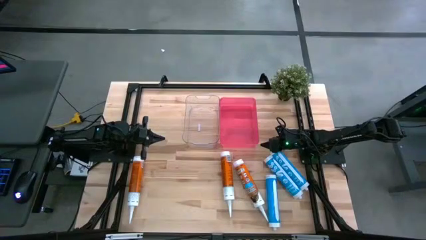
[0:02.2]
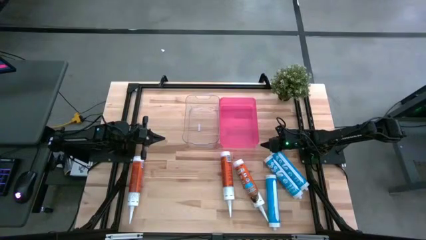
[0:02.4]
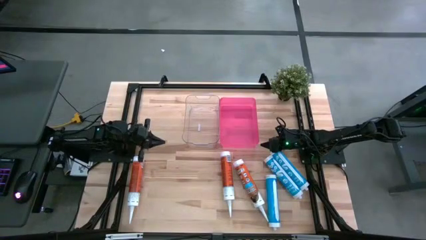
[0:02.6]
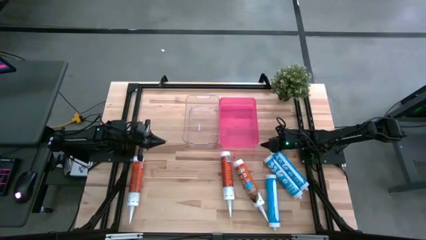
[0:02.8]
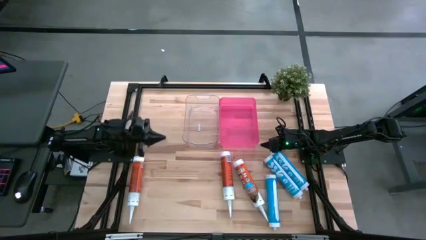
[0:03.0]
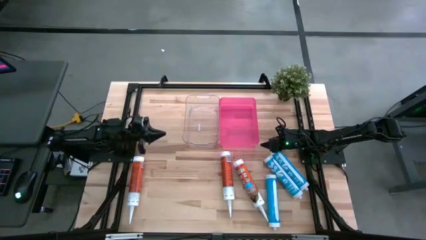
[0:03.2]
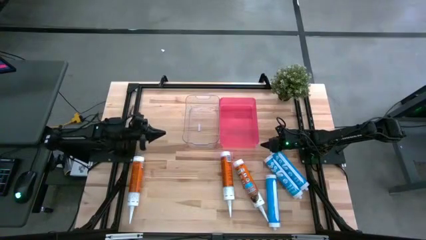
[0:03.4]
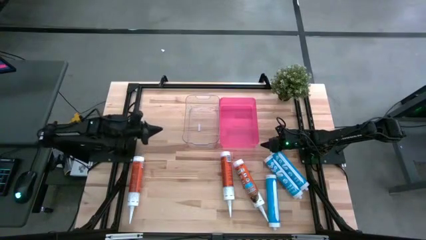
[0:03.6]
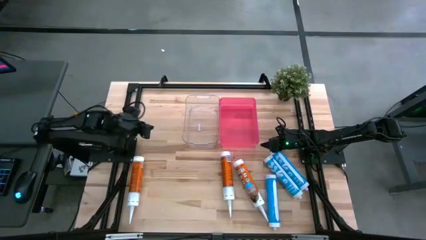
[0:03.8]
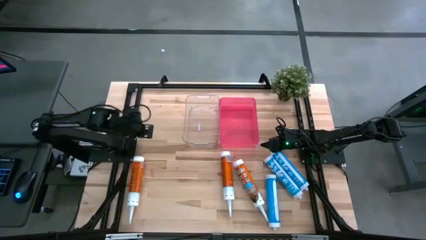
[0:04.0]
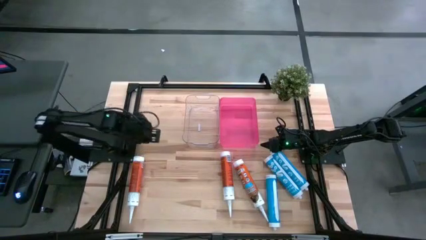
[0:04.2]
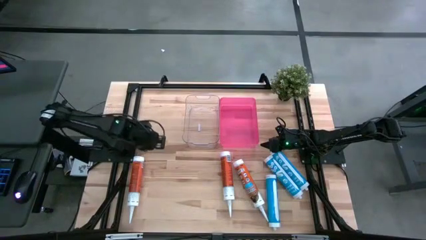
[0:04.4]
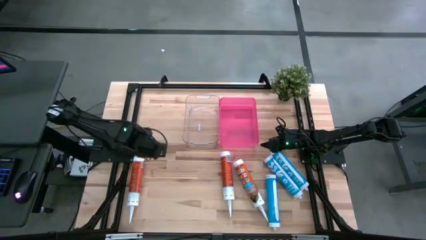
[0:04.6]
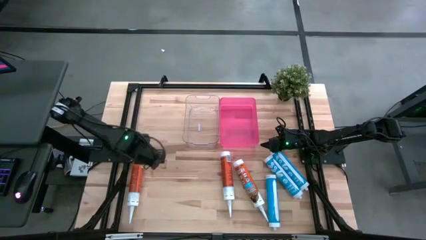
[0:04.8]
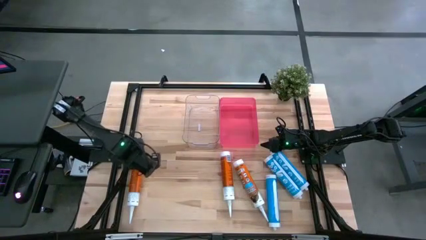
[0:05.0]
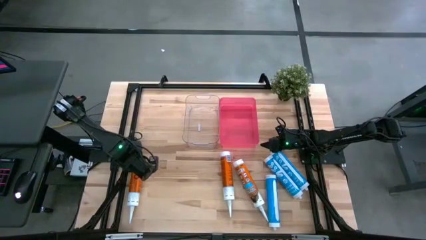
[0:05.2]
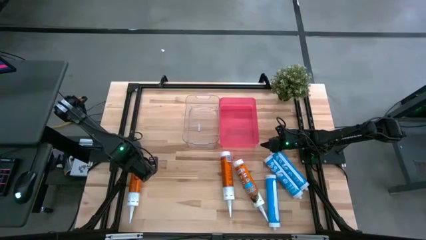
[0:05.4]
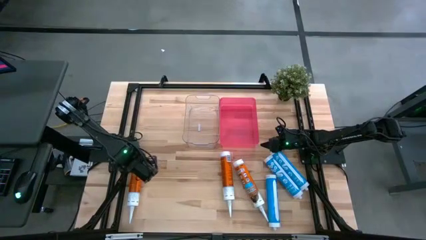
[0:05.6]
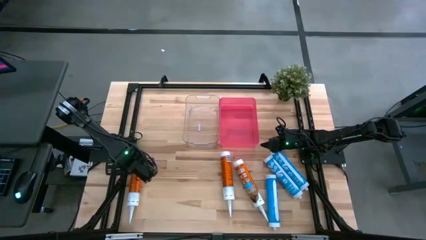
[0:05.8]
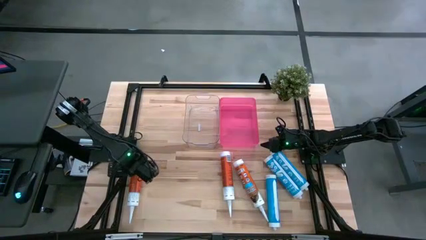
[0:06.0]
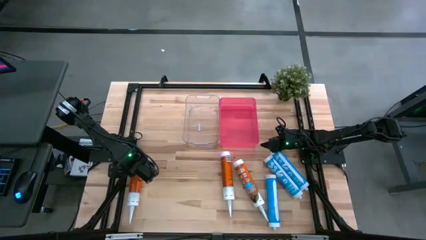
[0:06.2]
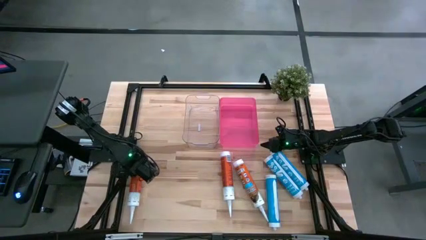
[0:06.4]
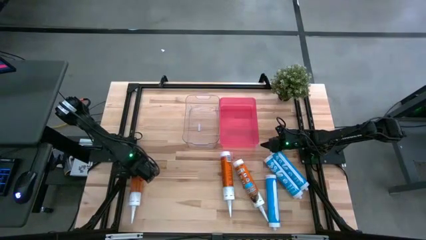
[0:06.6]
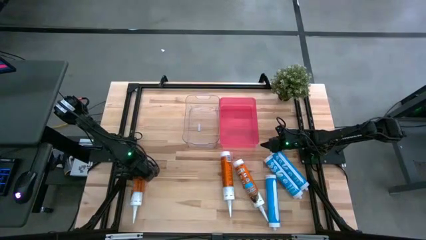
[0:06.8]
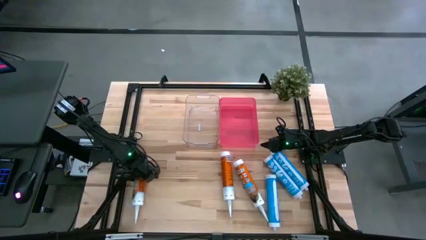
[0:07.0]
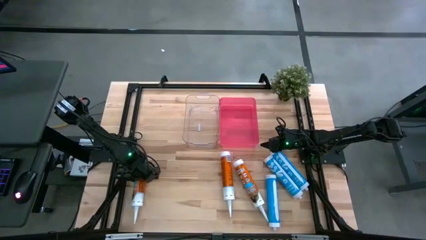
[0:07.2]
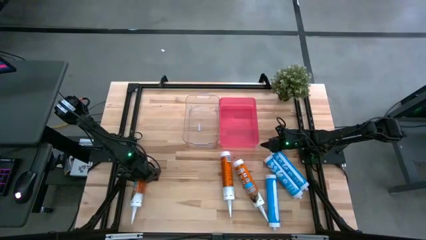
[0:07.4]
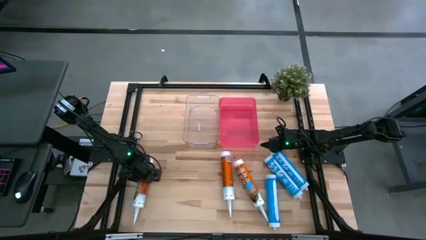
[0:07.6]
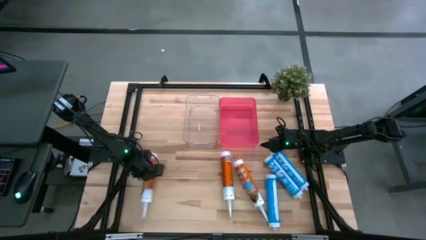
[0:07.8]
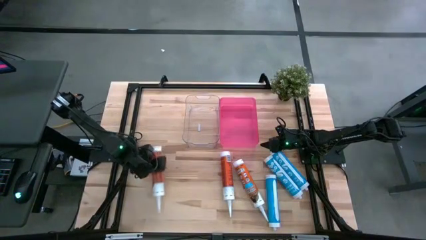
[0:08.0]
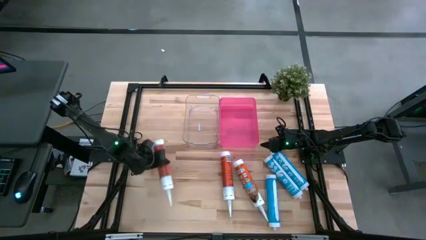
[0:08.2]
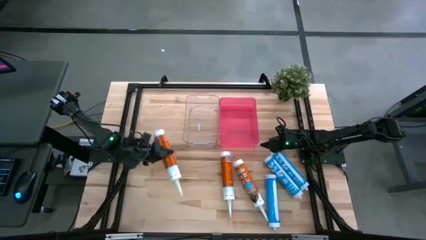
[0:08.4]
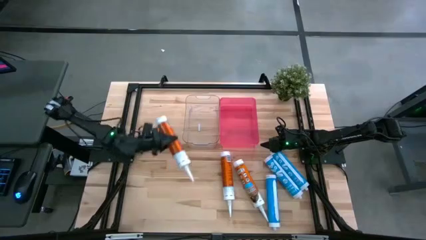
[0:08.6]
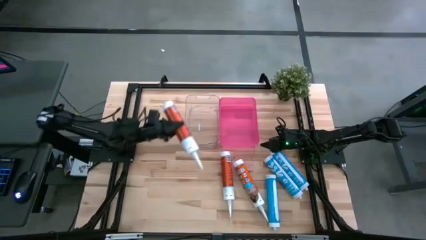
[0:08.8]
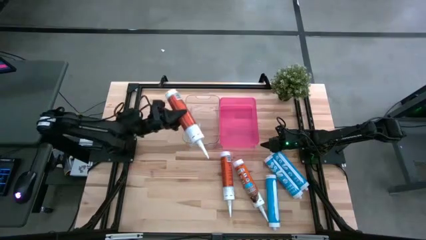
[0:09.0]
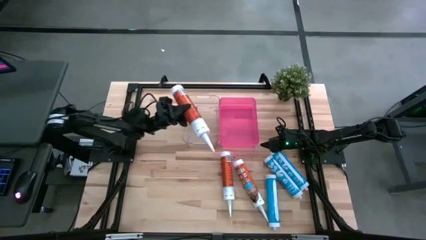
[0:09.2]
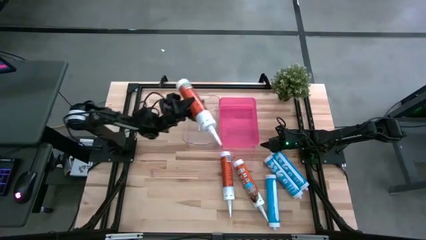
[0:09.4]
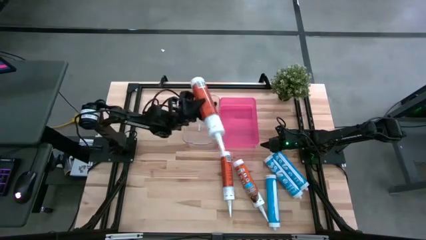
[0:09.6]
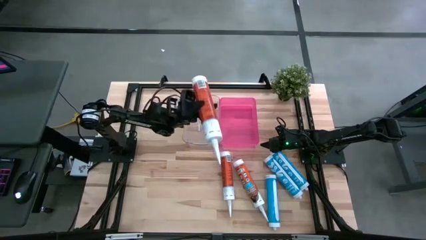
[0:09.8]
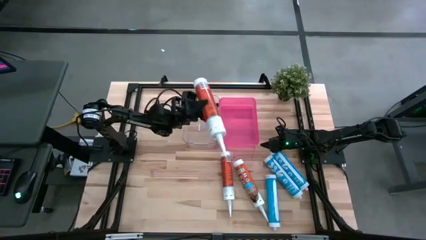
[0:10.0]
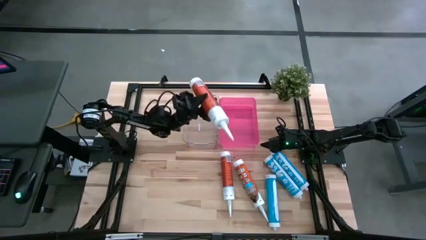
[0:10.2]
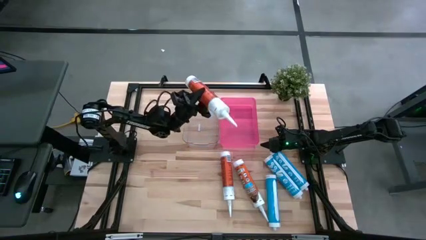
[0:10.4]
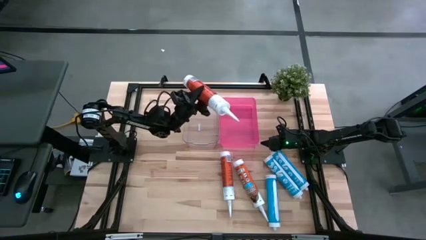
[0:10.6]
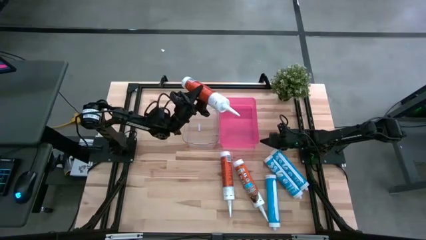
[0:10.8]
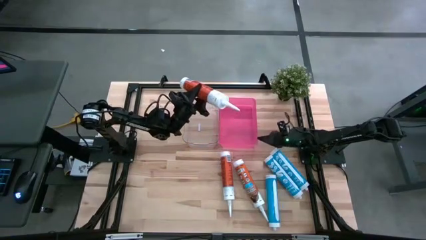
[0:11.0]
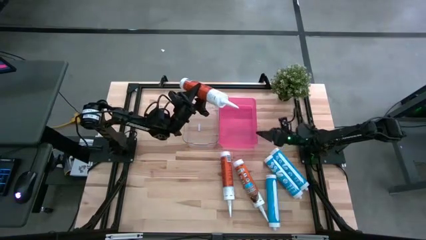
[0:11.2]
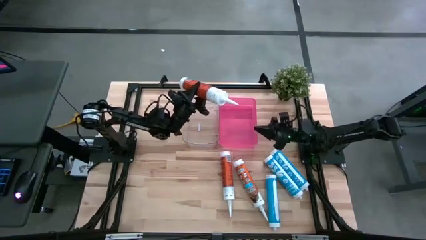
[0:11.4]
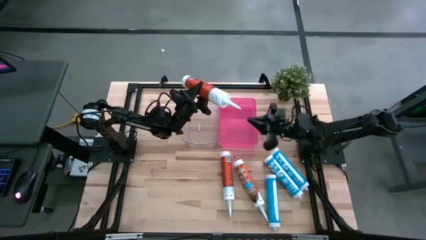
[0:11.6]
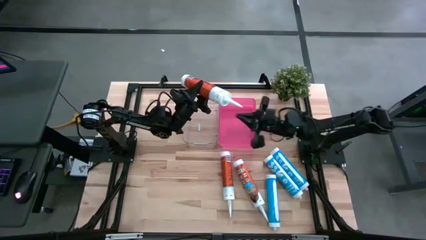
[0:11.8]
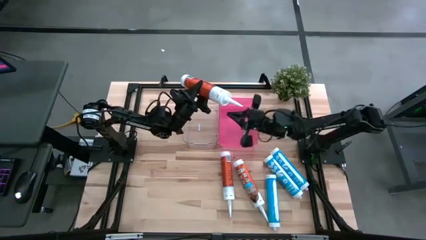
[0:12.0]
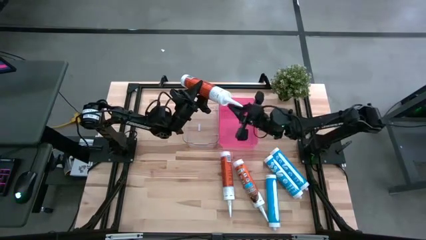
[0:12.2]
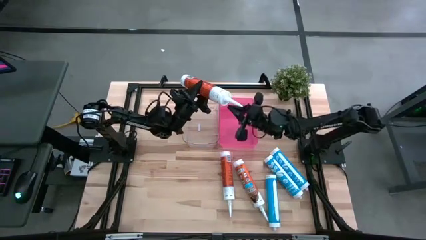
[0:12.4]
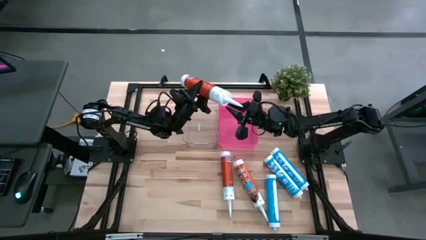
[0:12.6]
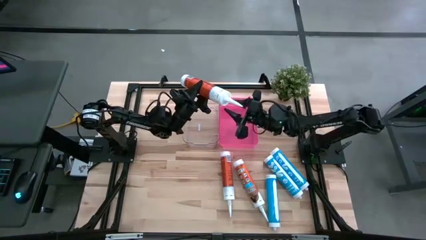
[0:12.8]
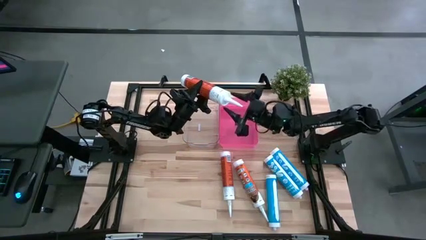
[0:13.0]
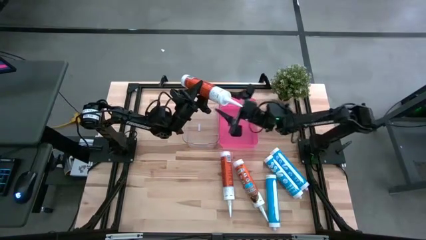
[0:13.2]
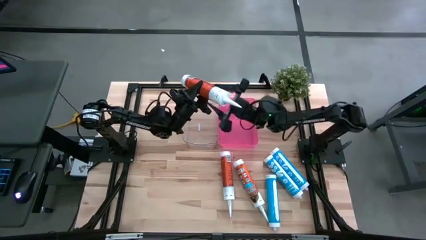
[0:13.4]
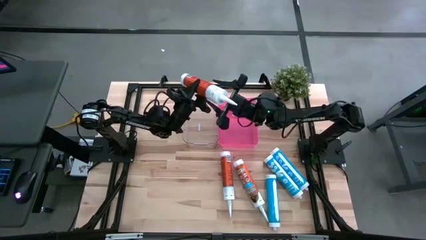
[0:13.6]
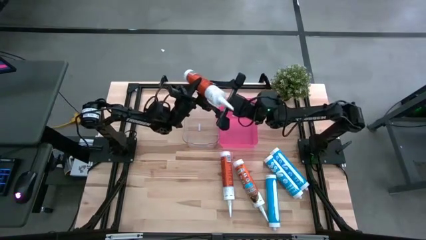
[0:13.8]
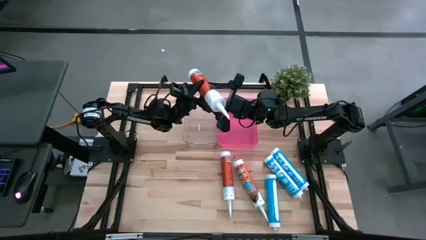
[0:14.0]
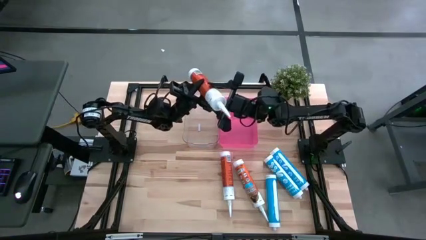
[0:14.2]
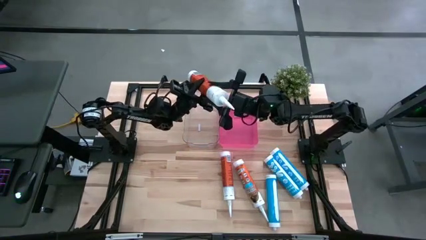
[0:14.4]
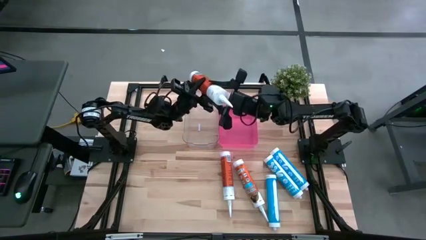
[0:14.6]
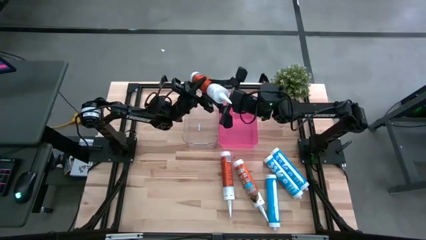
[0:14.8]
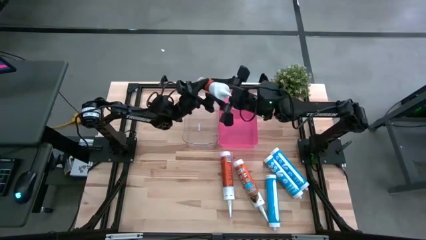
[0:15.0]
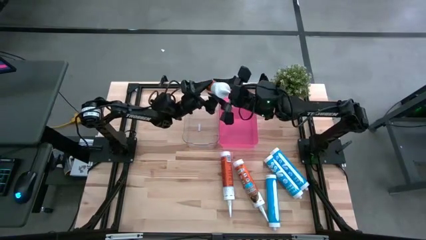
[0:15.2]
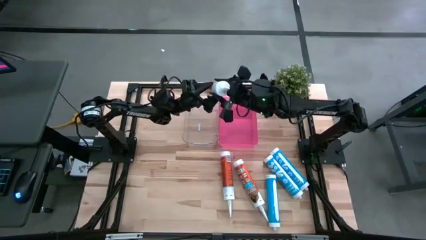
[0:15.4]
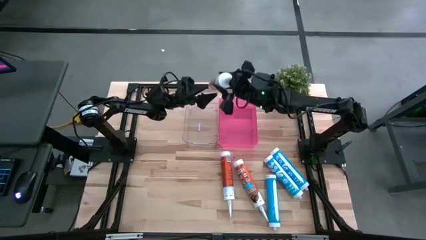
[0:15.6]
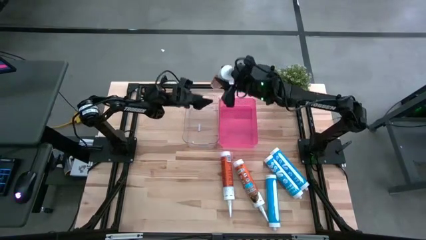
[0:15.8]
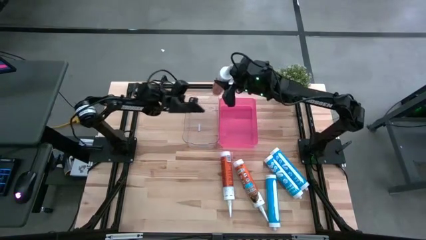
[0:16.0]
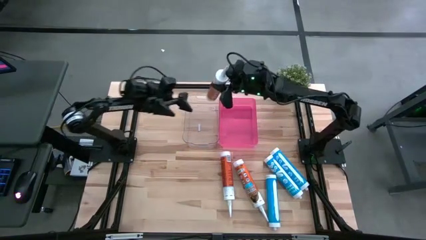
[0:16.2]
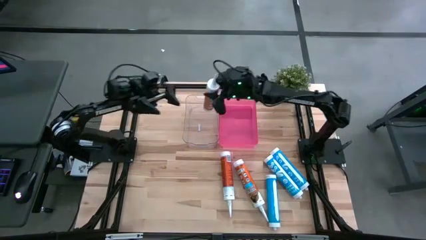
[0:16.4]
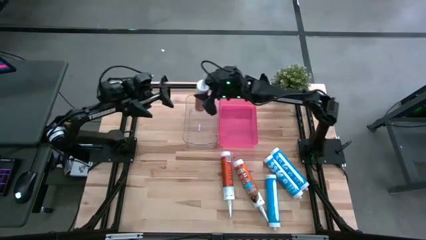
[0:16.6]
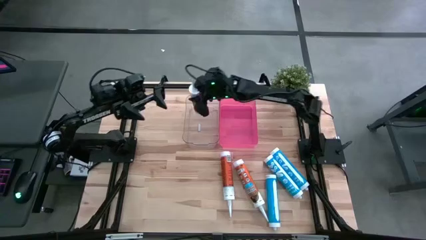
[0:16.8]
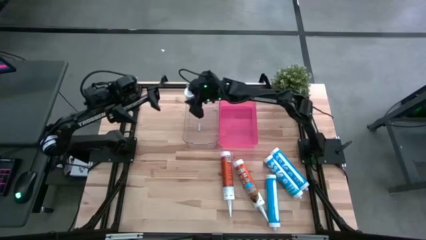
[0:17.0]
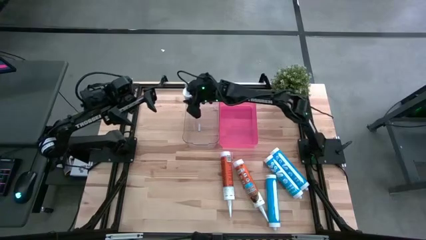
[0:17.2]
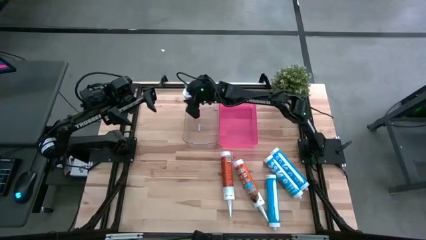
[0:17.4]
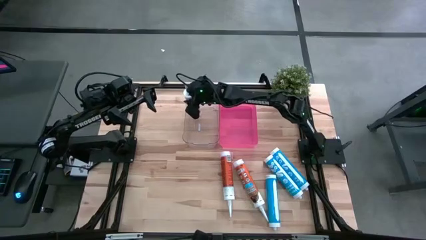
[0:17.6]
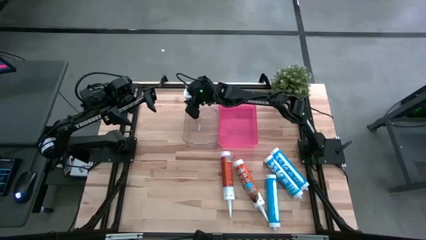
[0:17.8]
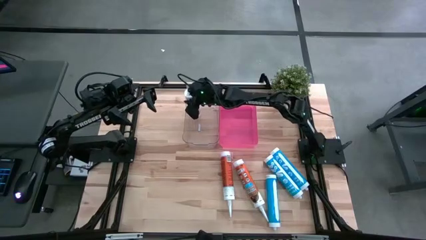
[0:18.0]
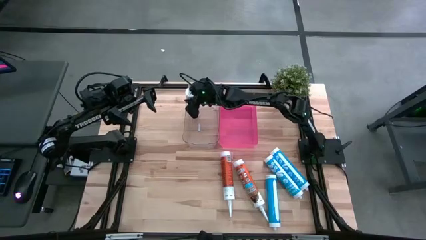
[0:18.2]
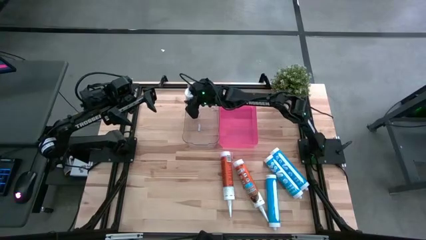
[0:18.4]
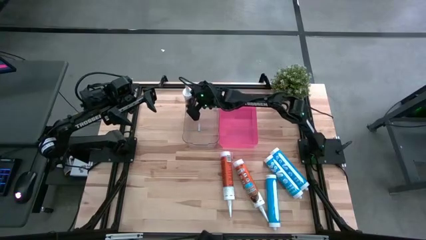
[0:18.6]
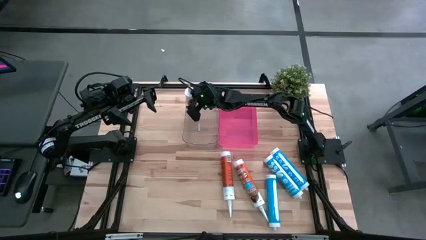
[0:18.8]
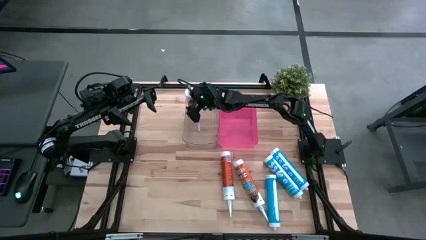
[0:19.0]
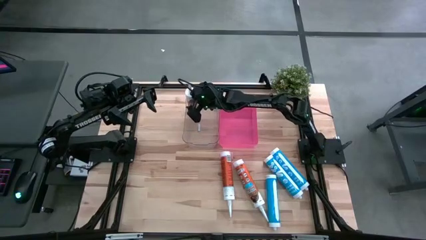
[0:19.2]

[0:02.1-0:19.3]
Task: Pick & place silicon tubes, Sealant and Lysol wipes
Put the left orange sealant into the transparent bin
